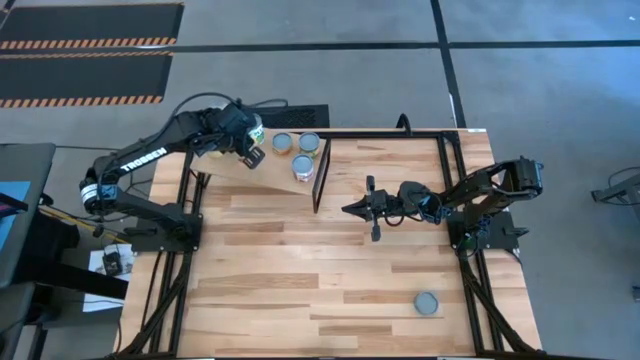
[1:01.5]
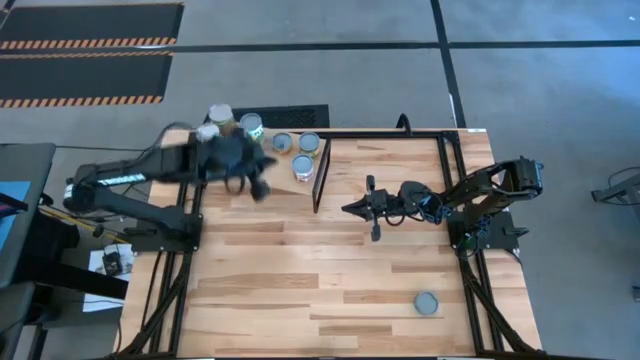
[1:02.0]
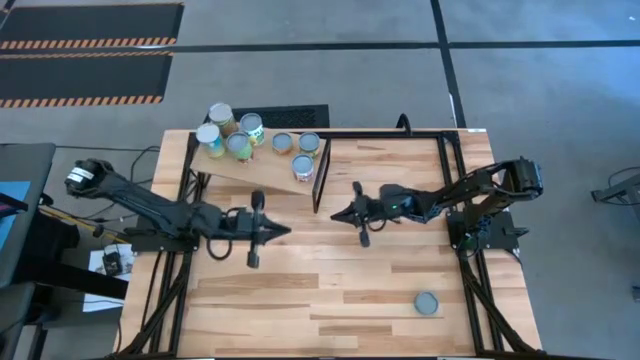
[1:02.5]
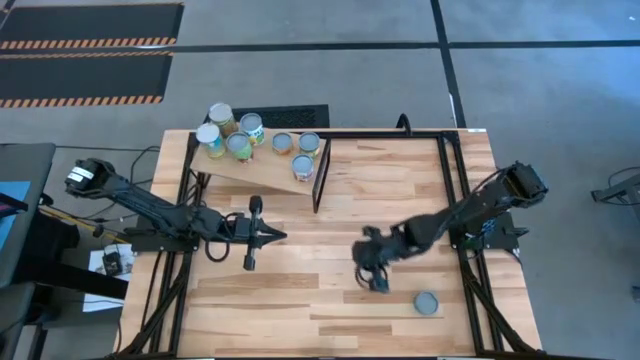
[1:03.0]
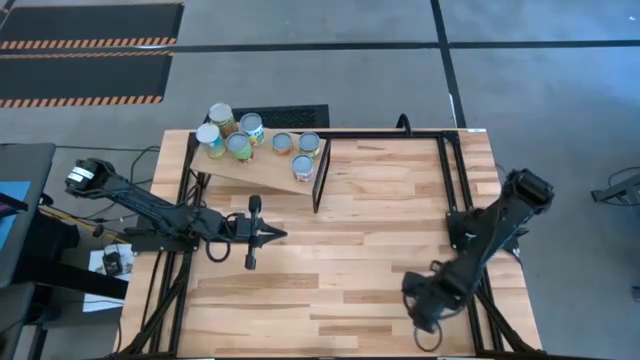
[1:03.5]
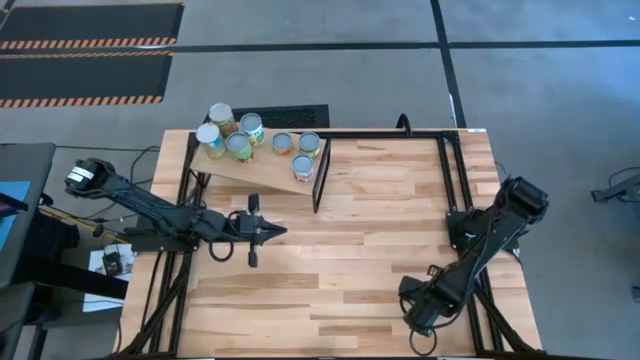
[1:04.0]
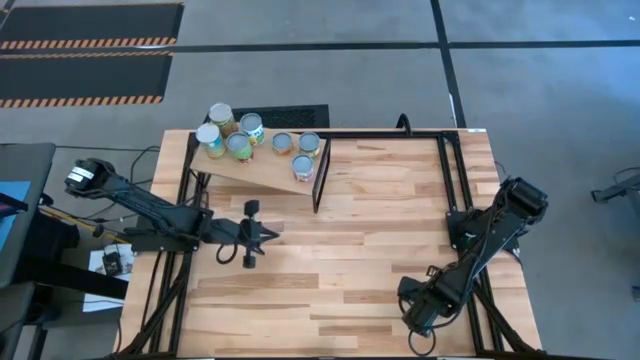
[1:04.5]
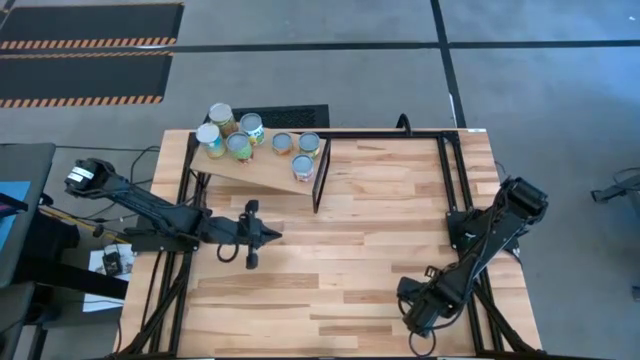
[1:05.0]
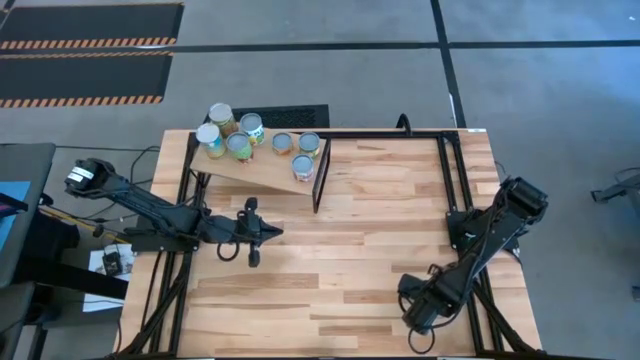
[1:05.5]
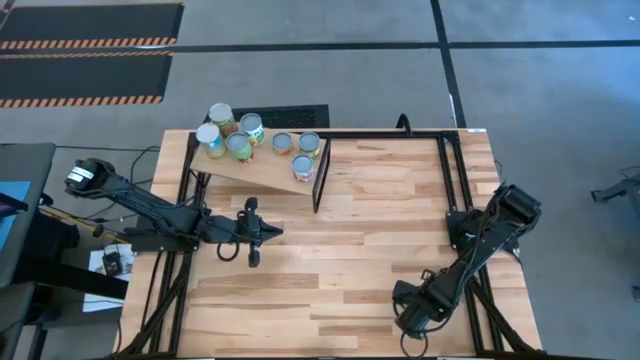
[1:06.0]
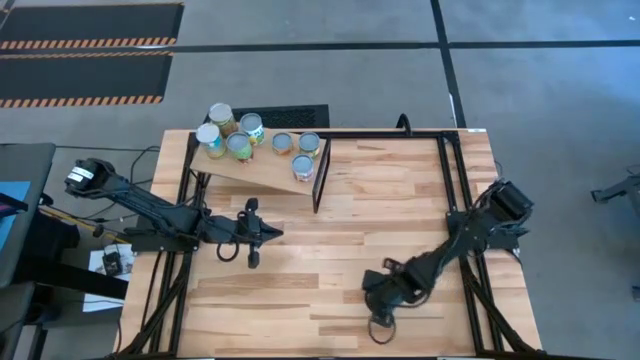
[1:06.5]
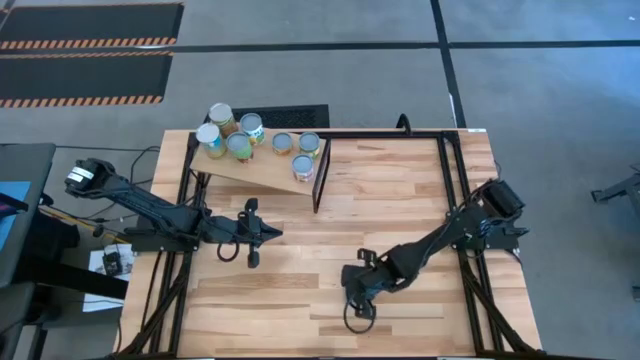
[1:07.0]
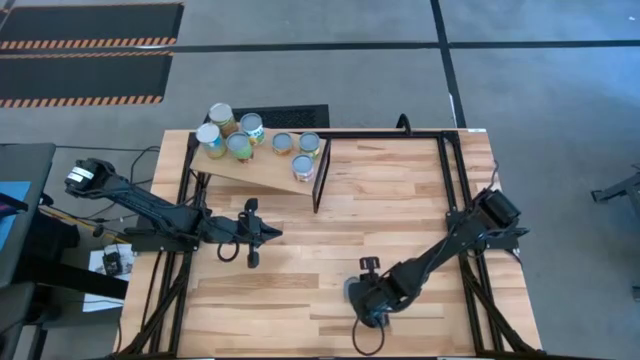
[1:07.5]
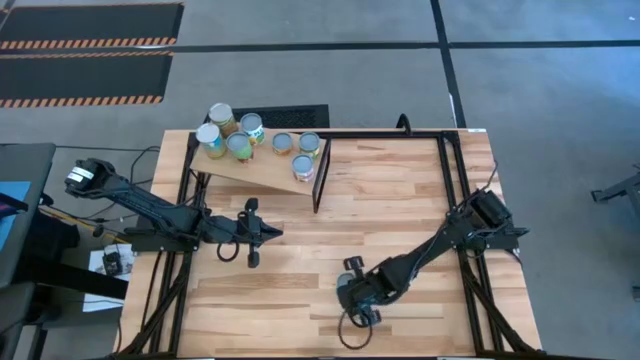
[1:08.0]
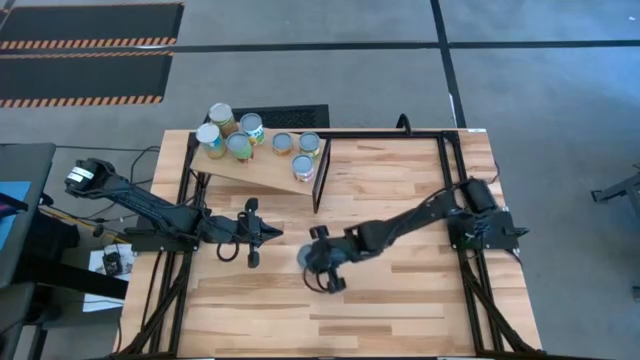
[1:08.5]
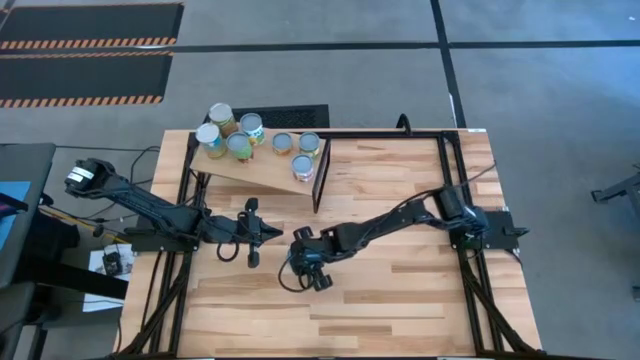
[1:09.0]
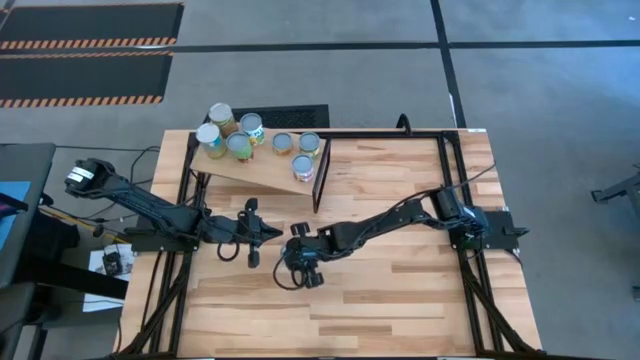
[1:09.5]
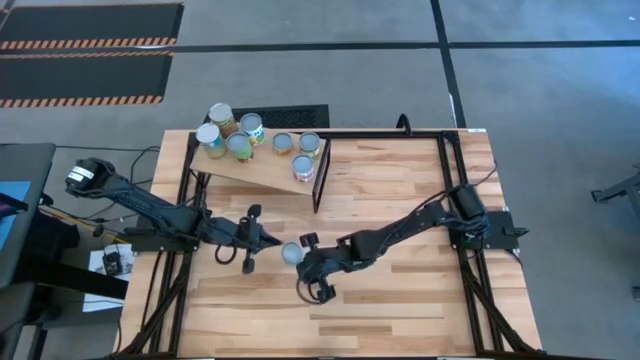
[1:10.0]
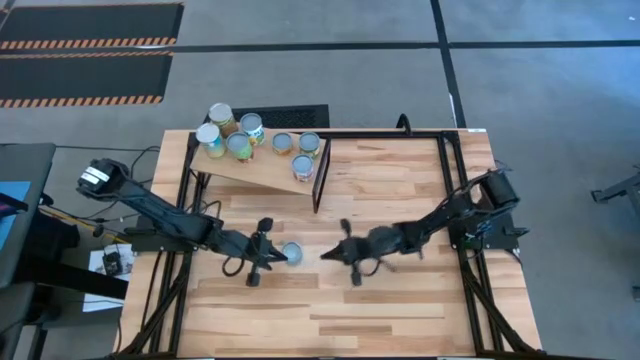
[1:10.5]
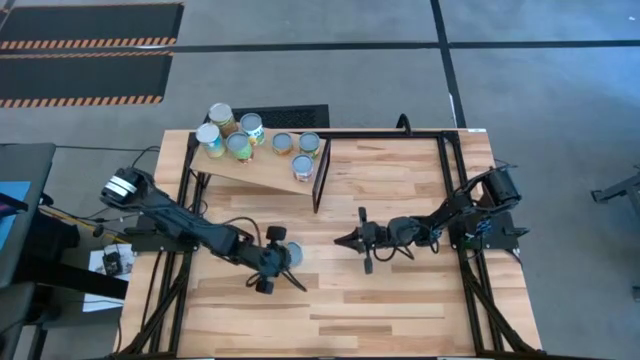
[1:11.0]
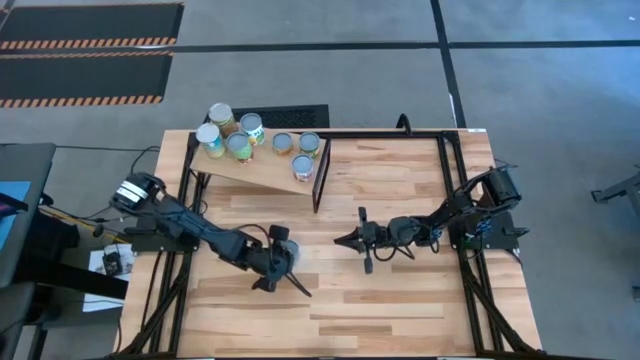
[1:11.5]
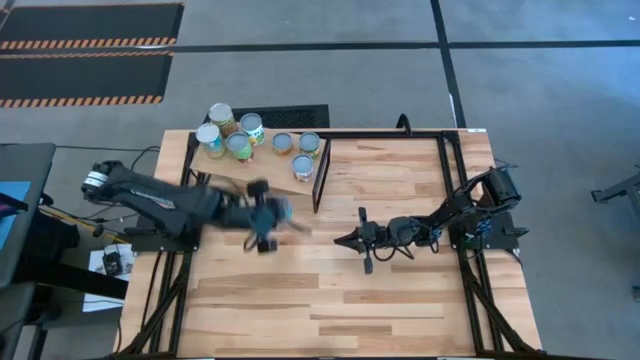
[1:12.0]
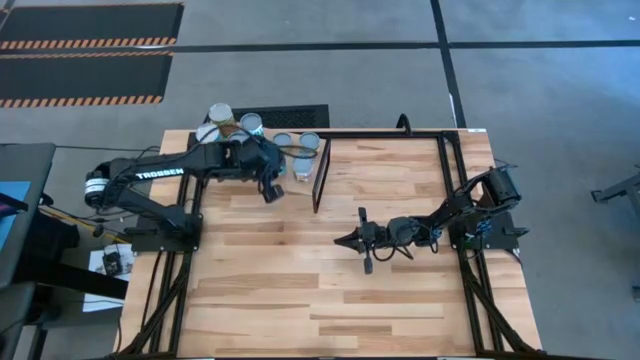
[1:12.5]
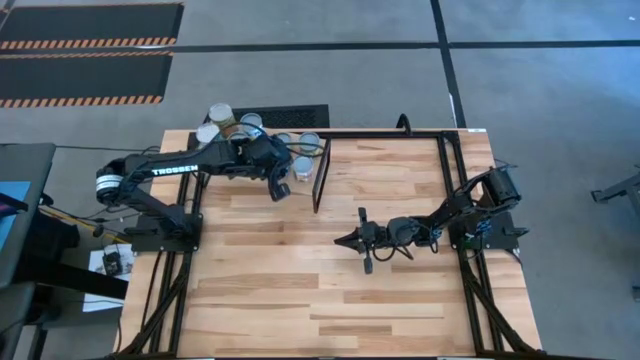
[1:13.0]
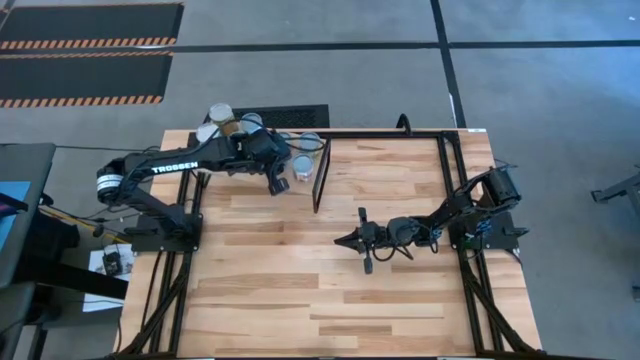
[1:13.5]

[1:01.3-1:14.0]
Task: Pick and place cans onto a shelf
Put the canned tuna on the shelf

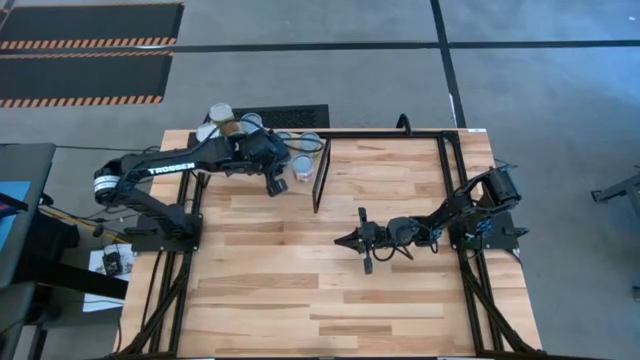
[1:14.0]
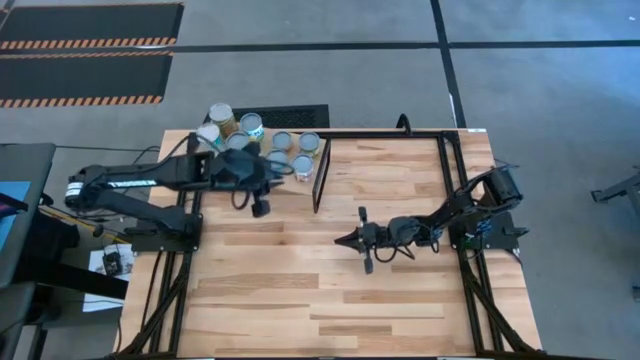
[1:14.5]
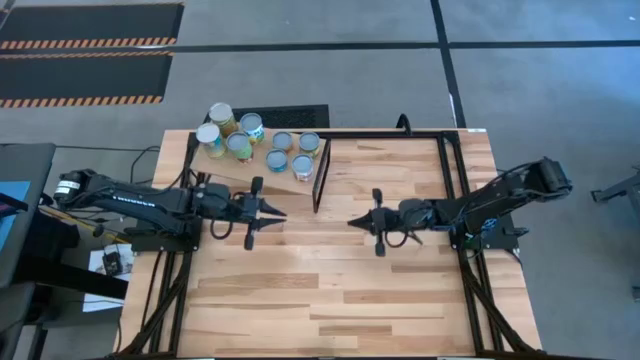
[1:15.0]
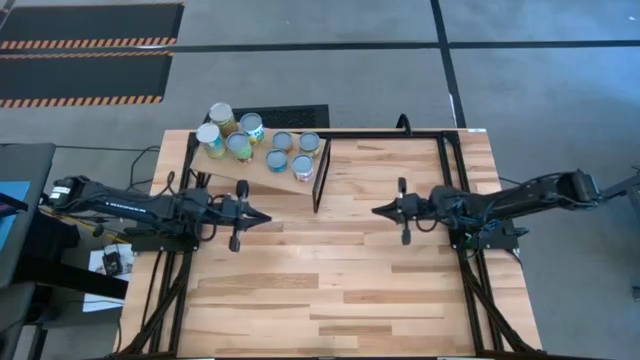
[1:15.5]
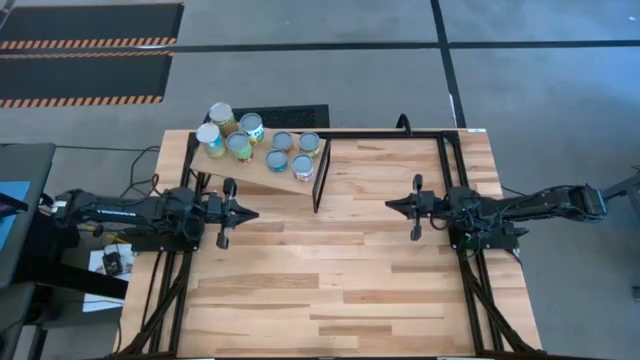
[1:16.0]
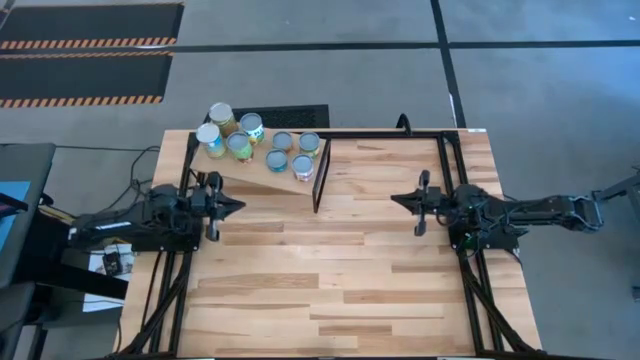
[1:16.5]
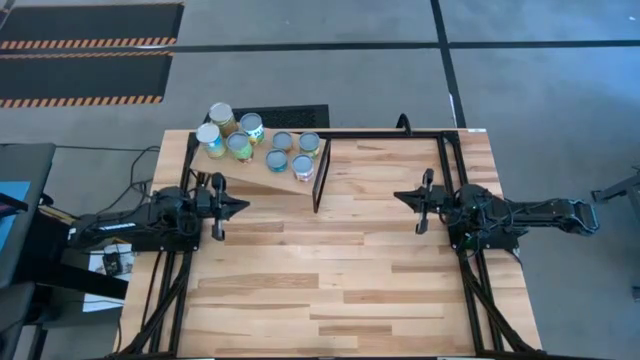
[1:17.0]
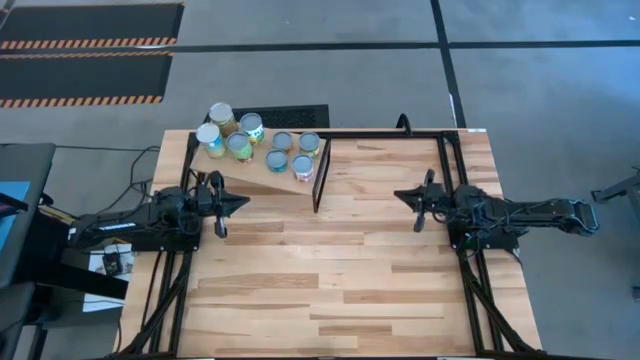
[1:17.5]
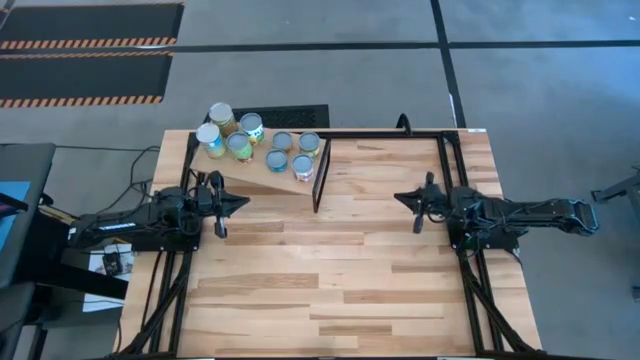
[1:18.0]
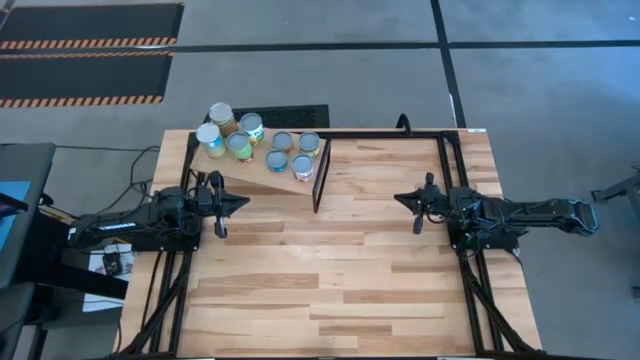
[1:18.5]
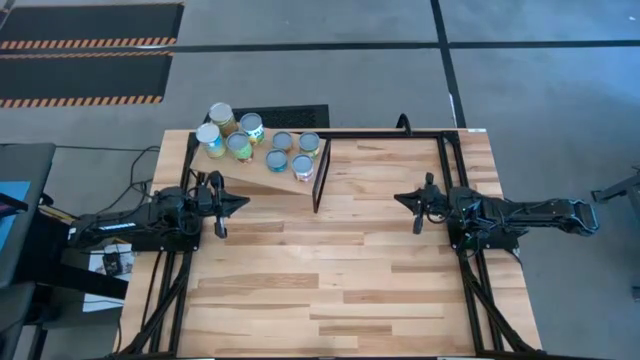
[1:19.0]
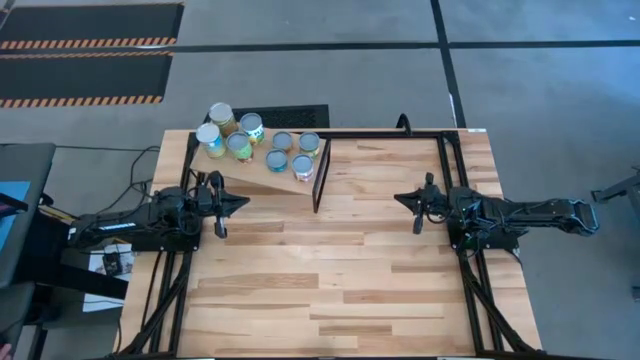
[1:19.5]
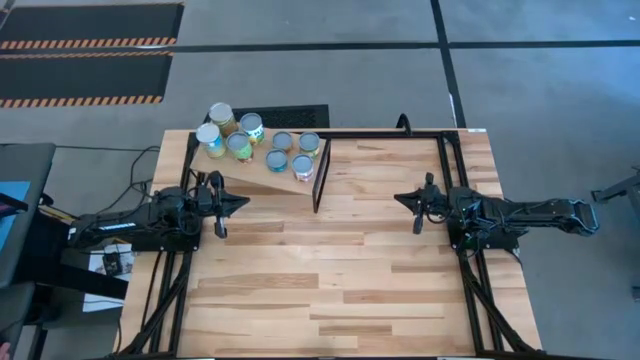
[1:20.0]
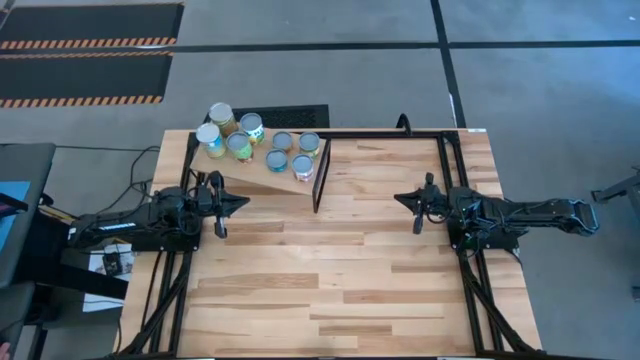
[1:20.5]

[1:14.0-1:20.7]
Return to Home Position

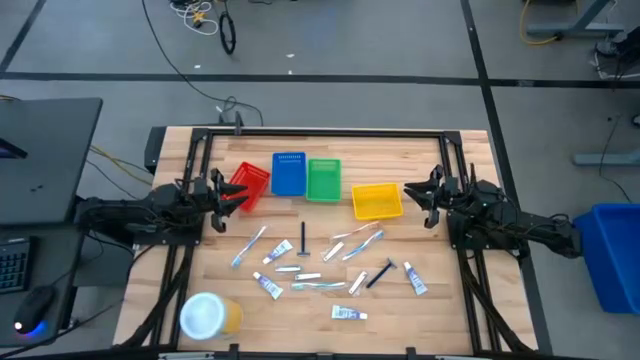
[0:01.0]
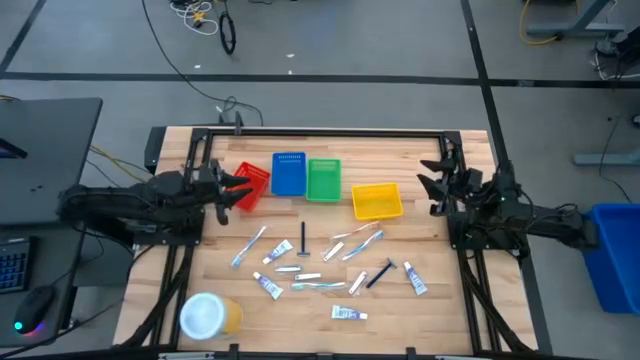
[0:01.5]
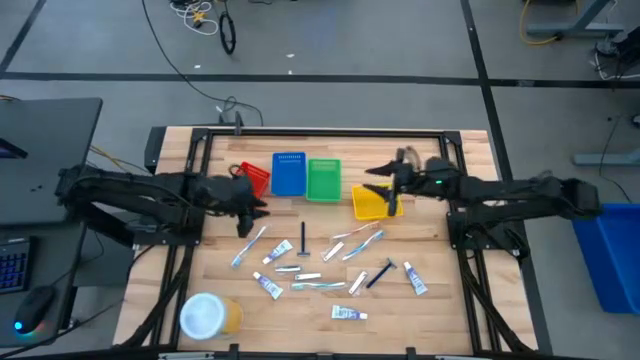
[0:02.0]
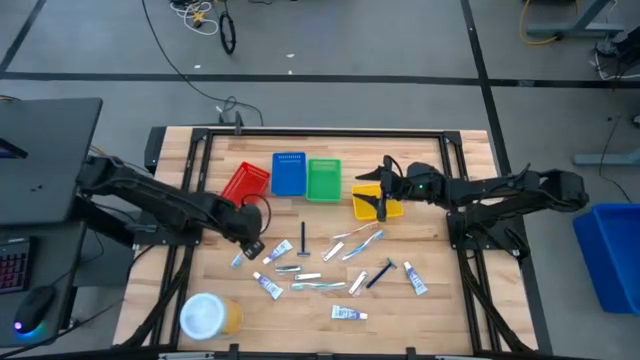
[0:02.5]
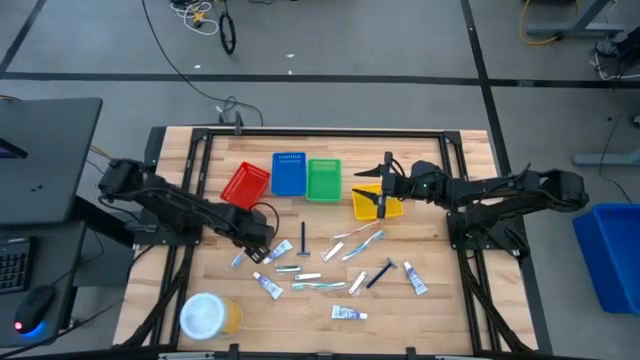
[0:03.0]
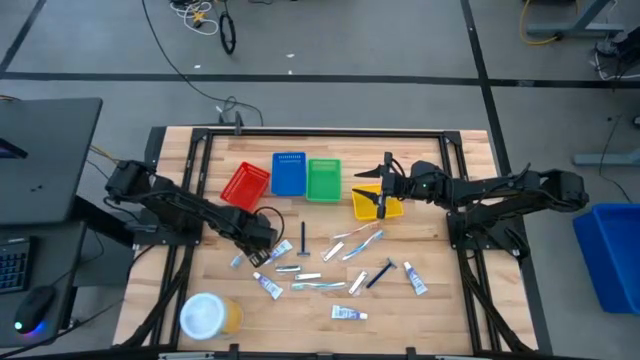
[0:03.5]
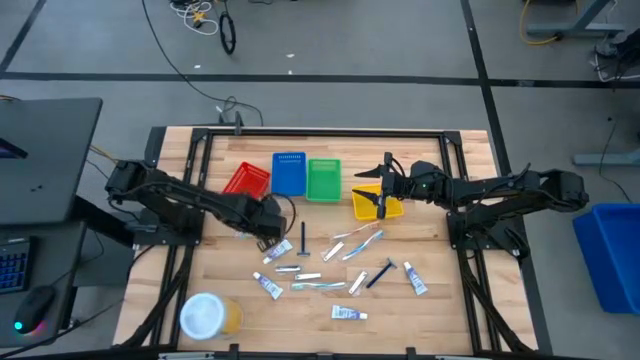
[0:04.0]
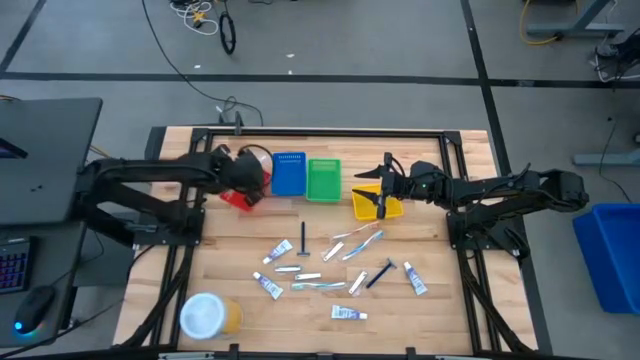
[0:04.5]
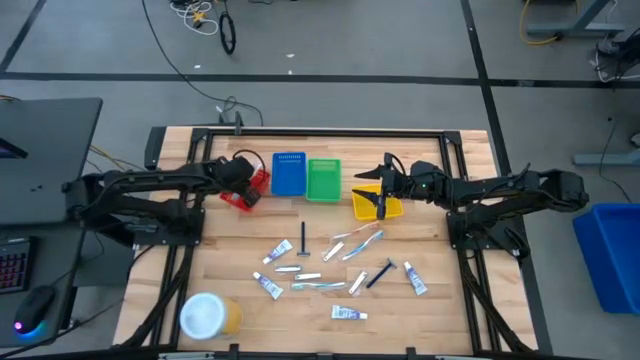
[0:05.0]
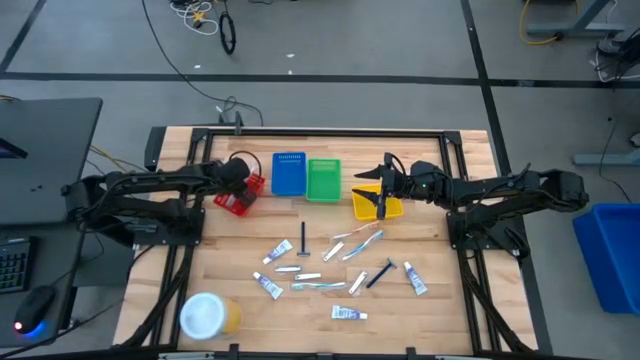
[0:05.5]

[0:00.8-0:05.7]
Task: Pick & Place Travel size toiletries
Put the blue toothbrush into the red bin
